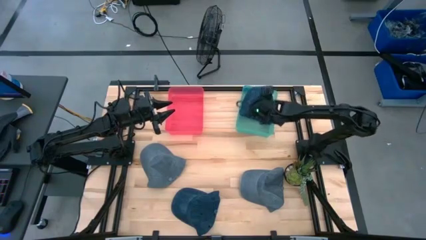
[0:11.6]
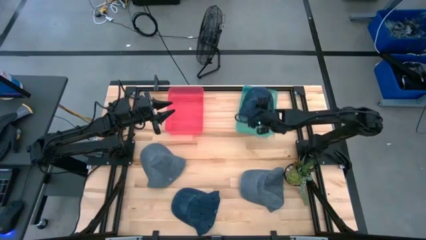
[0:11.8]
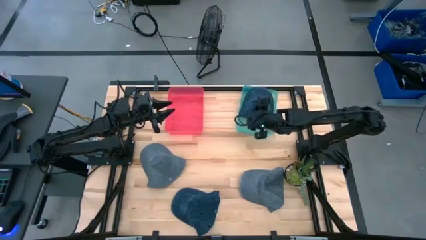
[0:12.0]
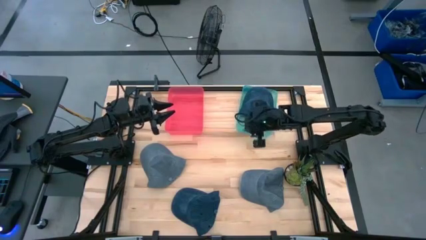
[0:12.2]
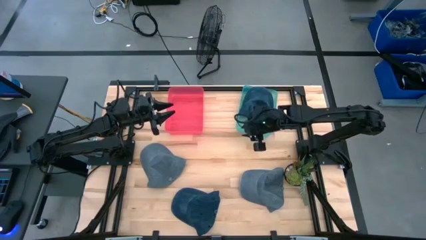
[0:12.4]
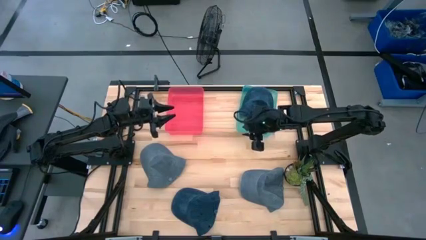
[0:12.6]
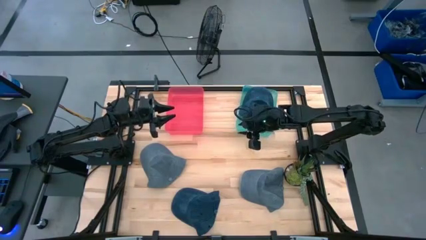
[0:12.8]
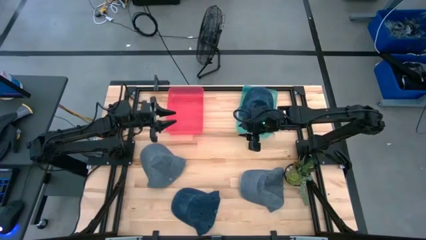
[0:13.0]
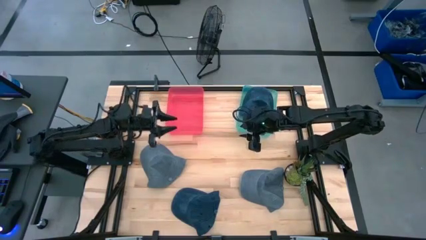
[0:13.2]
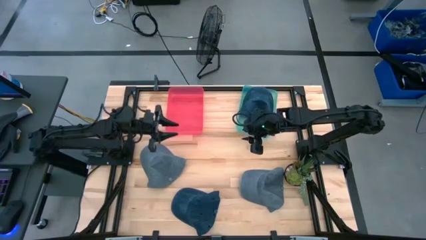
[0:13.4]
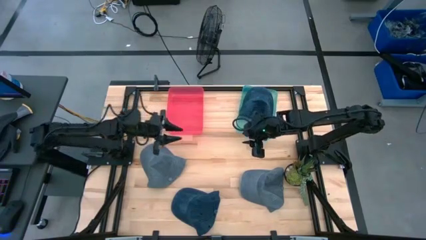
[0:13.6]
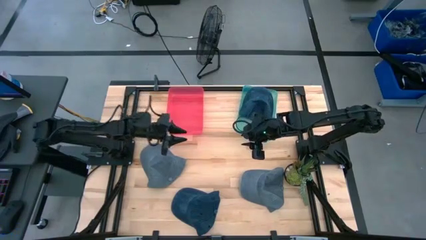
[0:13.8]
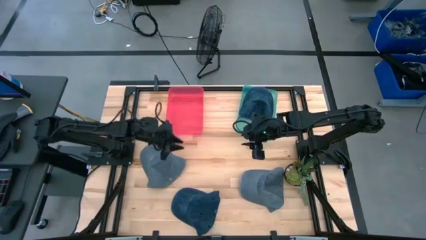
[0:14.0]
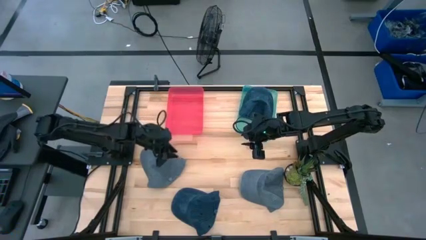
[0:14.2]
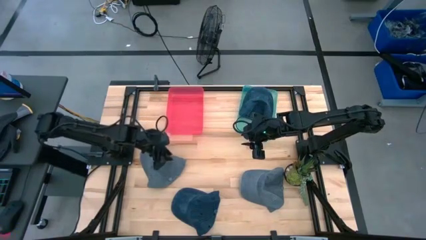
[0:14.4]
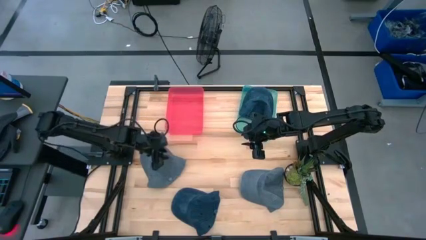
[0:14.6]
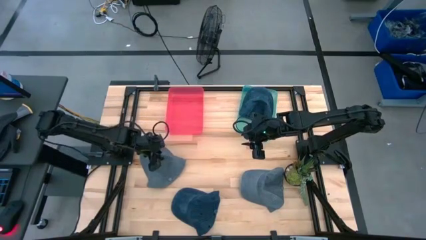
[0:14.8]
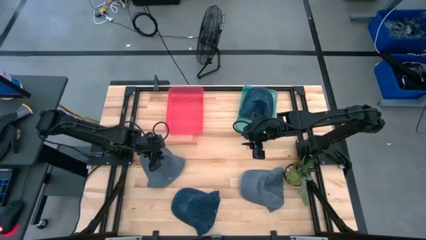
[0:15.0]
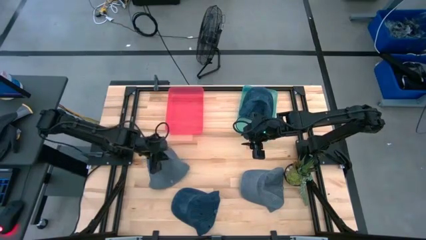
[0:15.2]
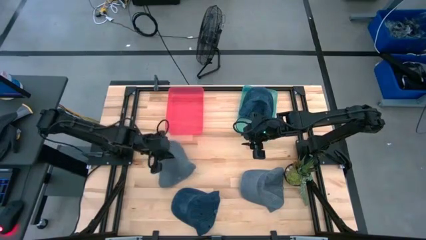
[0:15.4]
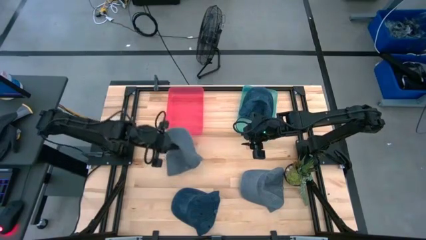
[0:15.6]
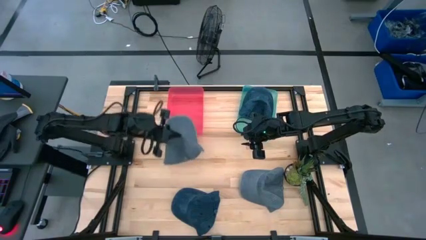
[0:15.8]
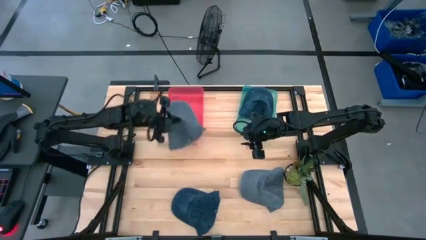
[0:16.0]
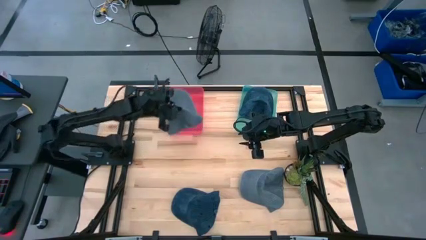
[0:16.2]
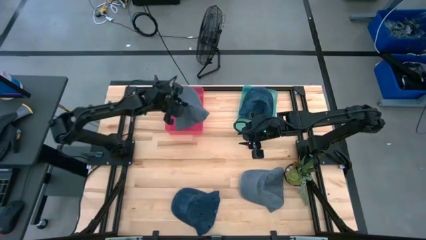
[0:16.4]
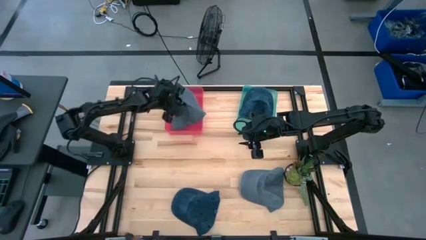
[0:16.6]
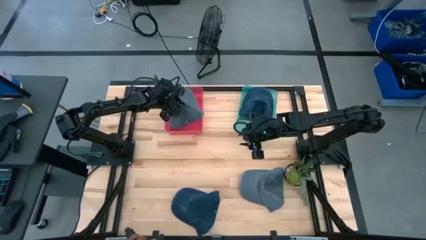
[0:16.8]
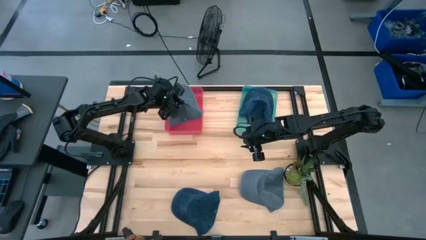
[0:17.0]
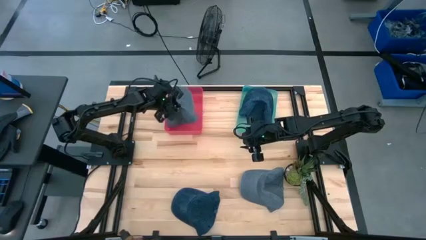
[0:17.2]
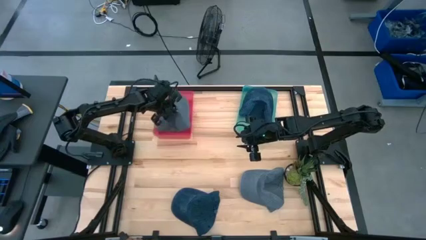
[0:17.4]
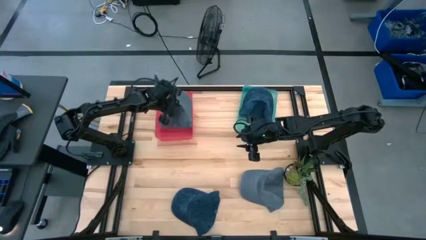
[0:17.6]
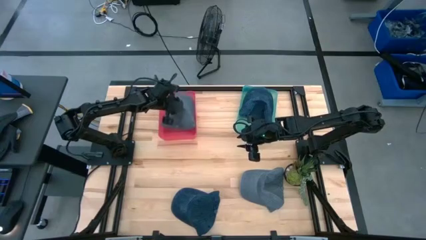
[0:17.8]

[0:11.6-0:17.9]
Task: Pick & Place hat
Put the left gray cap into the red bin

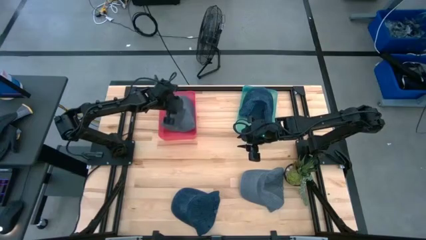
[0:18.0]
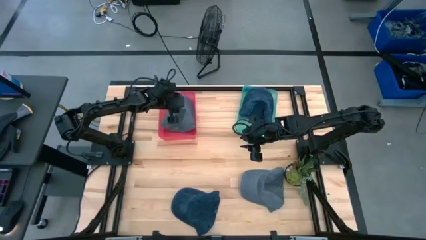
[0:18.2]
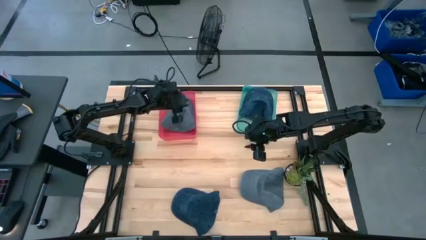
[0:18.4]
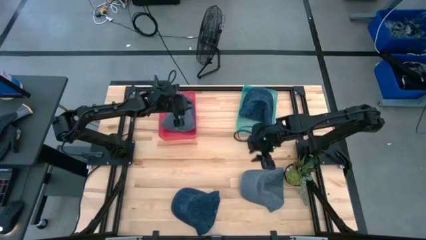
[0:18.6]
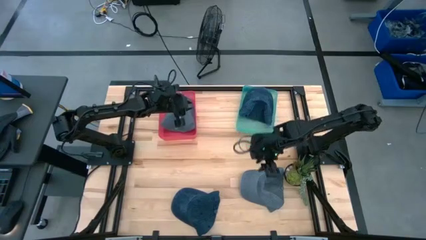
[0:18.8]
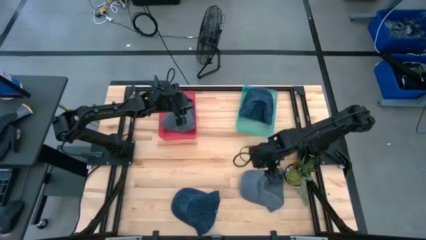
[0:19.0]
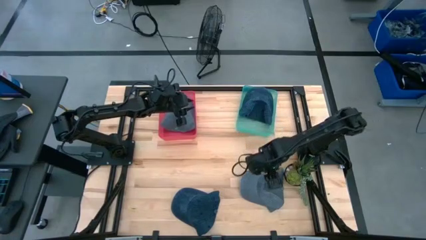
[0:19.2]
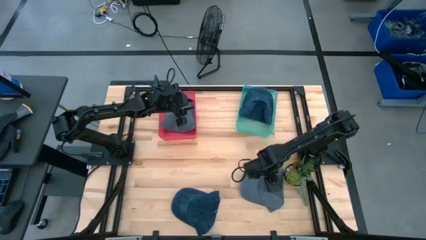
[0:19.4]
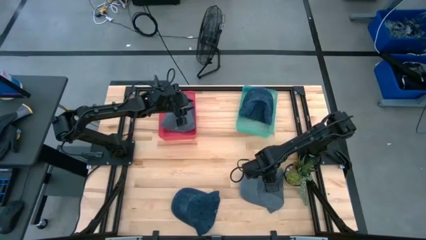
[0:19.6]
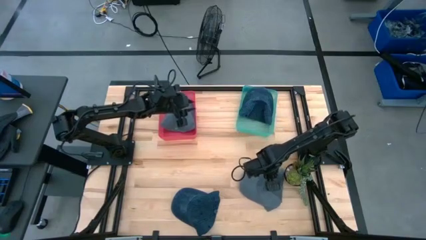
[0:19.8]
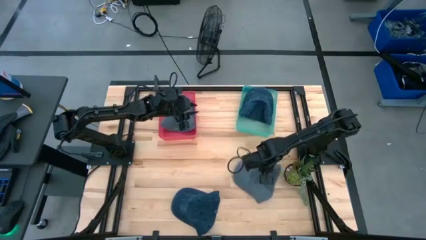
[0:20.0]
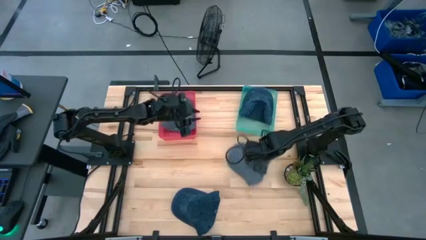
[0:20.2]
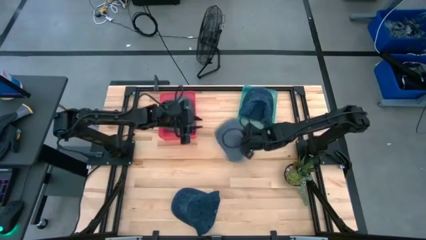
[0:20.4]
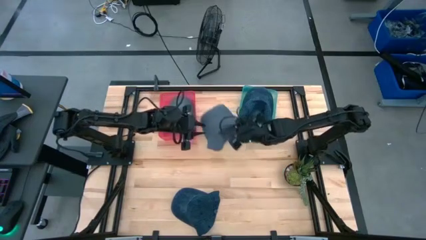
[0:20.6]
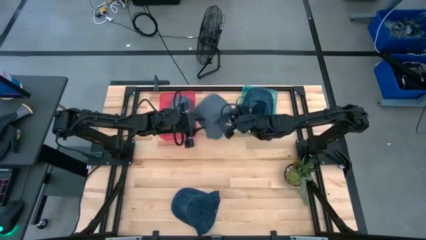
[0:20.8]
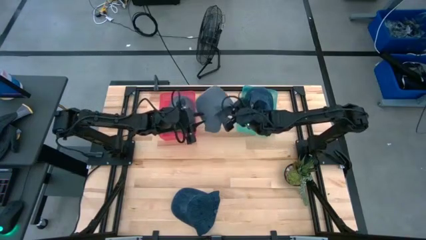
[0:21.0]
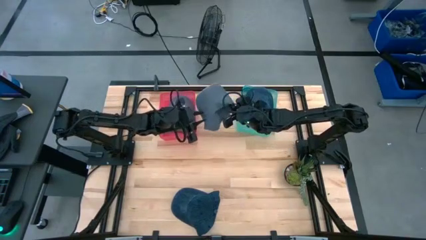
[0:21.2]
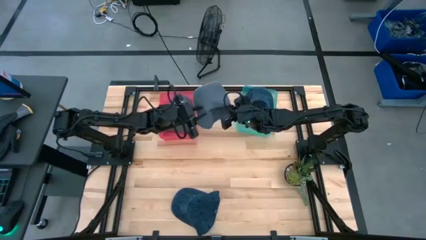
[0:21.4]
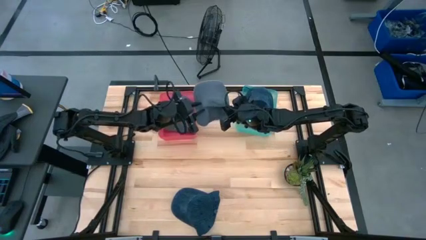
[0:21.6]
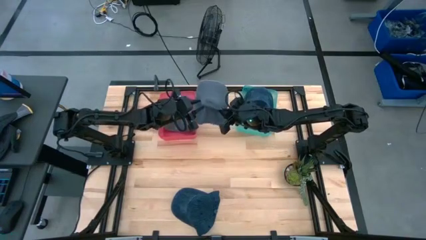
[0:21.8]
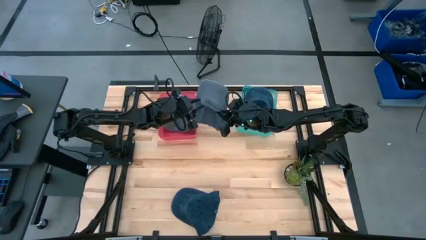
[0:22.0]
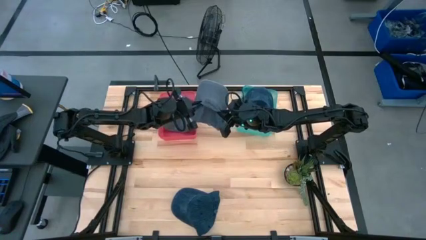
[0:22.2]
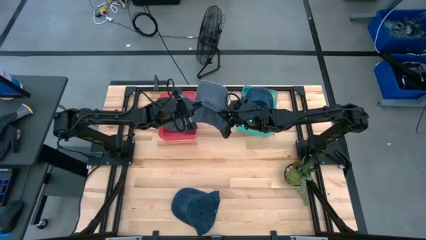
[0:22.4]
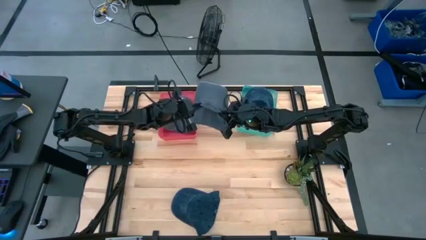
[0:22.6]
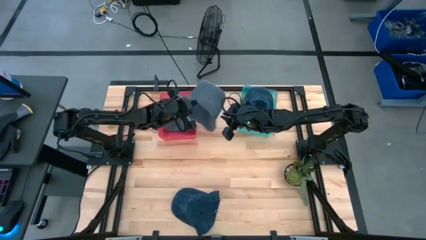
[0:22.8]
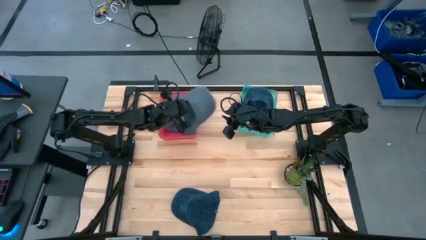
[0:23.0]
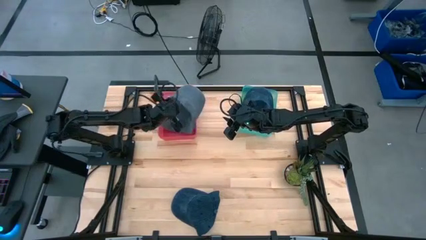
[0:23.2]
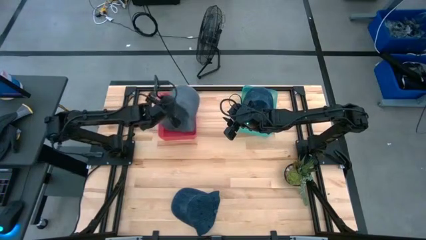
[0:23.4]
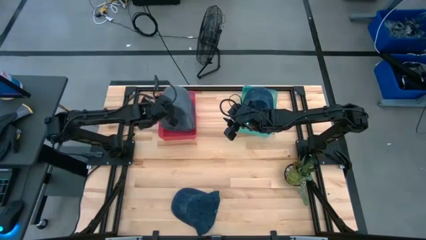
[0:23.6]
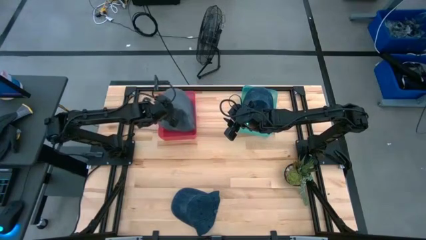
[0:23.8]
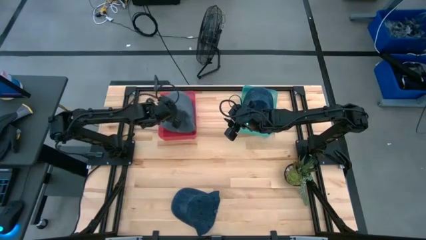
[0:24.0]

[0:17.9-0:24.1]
Put the gray cap into the red bin

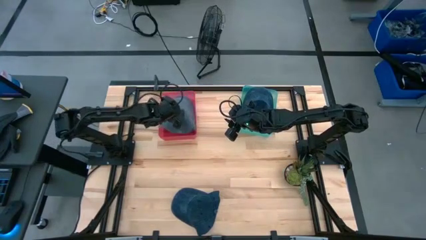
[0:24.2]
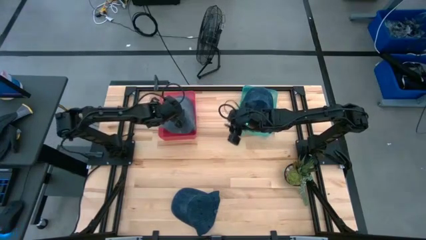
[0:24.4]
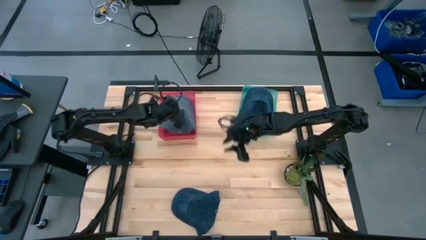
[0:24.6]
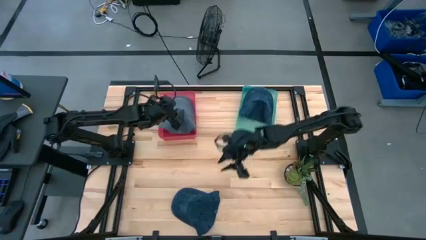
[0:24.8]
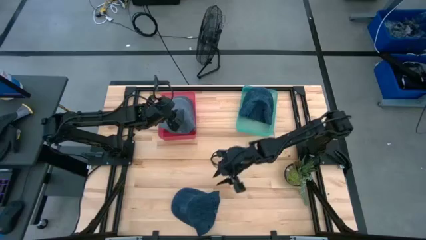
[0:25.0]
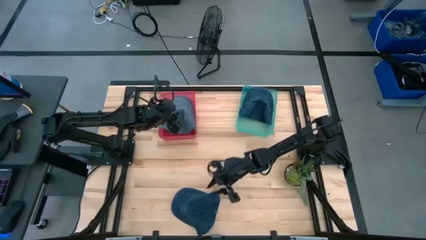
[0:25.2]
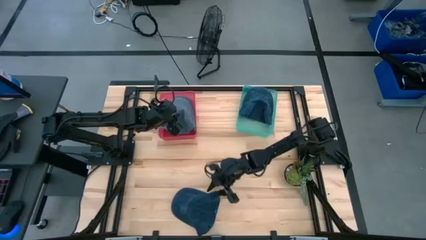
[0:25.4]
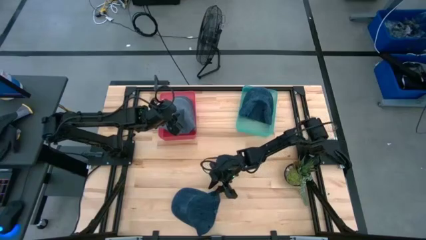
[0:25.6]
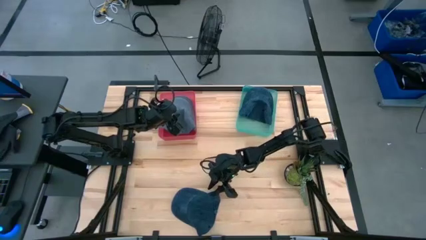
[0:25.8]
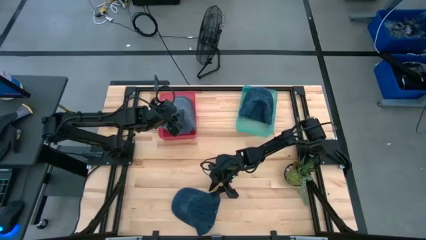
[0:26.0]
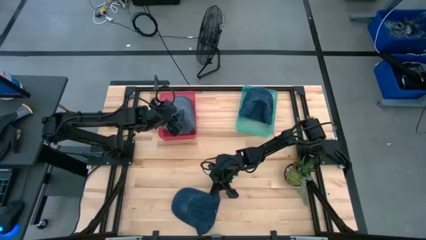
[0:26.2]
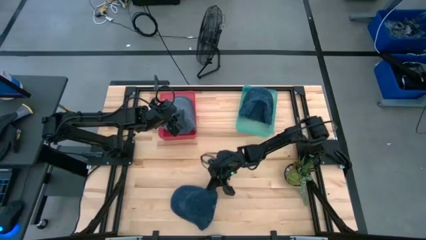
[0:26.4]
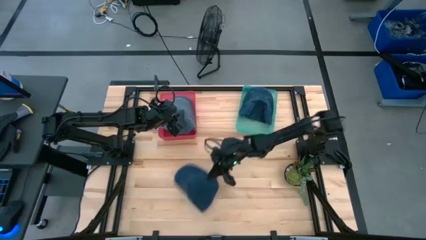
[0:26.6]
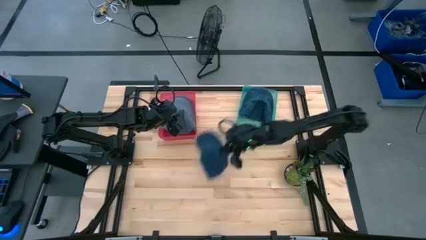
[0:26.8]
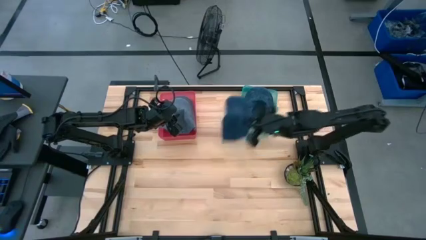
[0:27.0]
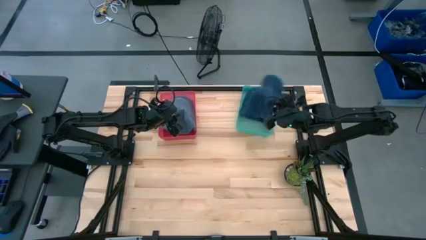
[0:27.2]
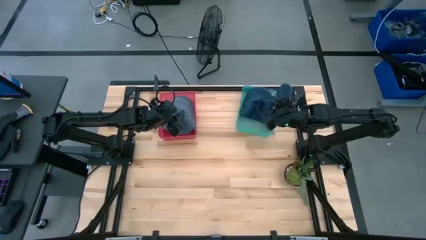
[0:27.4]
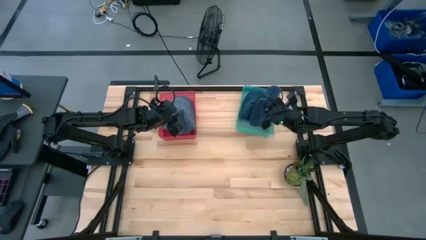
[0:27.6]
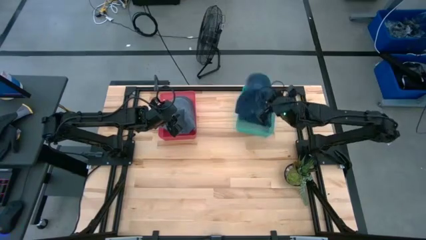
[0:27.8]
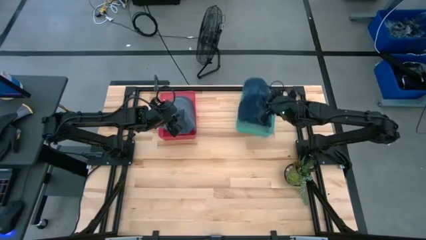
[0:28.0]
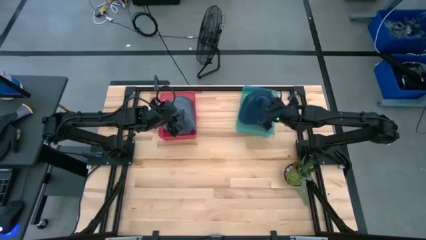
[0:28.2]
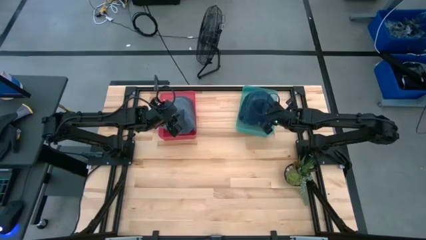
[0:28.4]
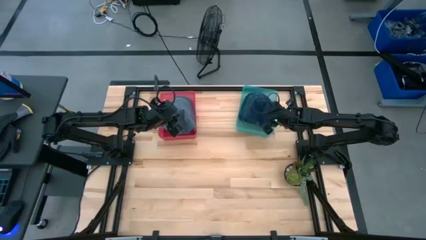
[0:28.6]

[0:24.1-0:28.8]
Put the blue cap into the green bin
